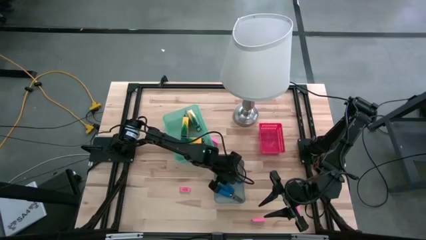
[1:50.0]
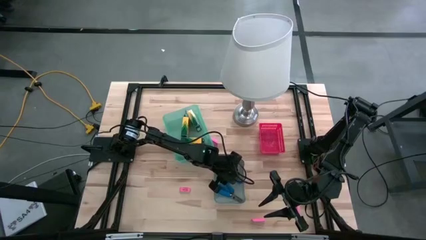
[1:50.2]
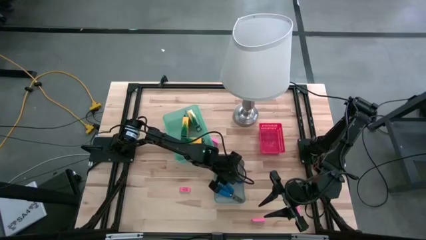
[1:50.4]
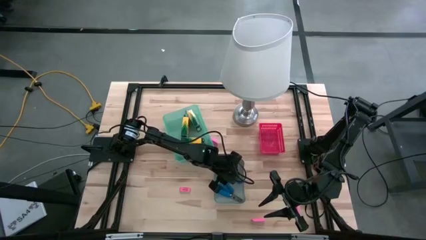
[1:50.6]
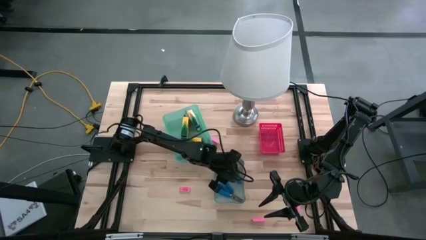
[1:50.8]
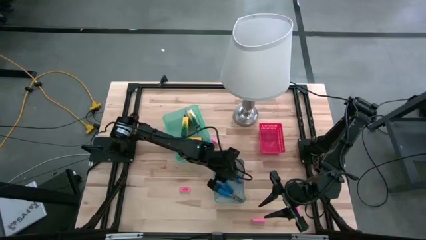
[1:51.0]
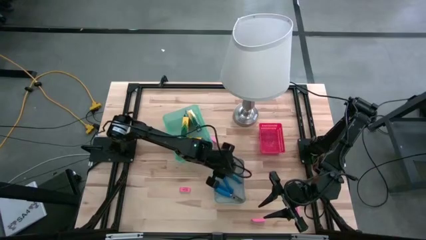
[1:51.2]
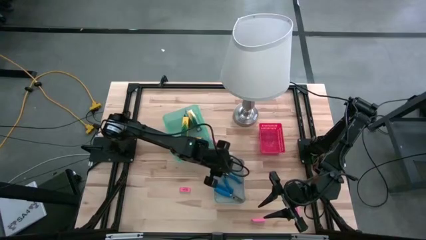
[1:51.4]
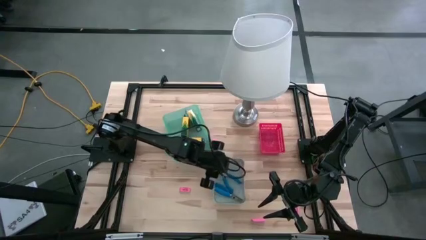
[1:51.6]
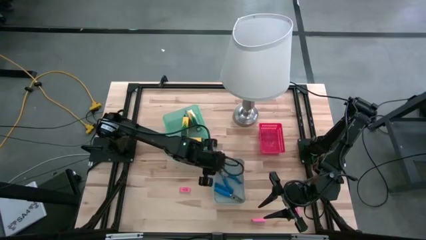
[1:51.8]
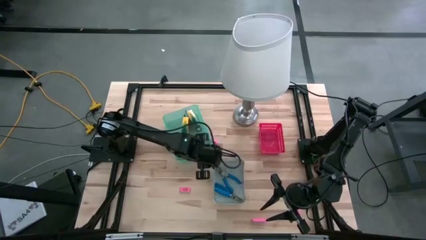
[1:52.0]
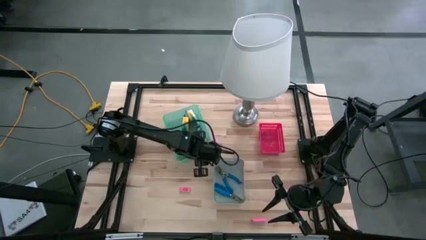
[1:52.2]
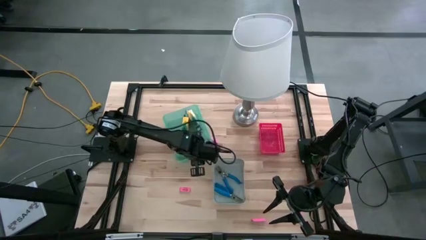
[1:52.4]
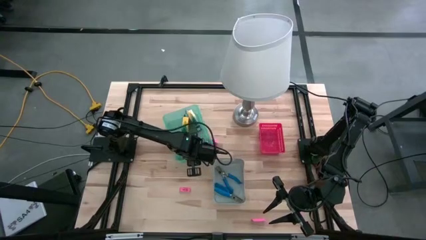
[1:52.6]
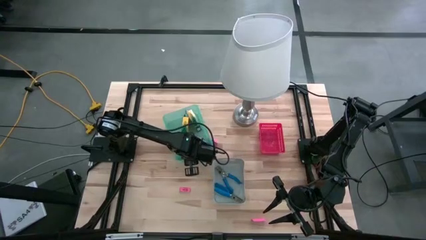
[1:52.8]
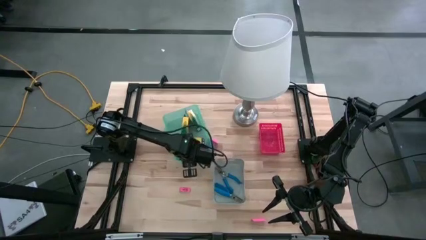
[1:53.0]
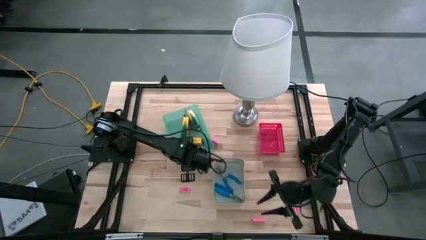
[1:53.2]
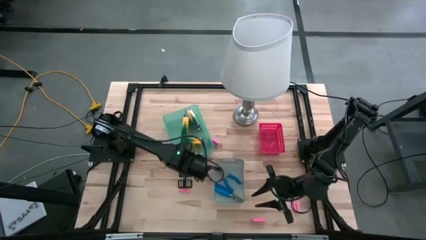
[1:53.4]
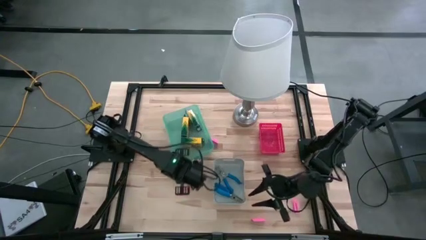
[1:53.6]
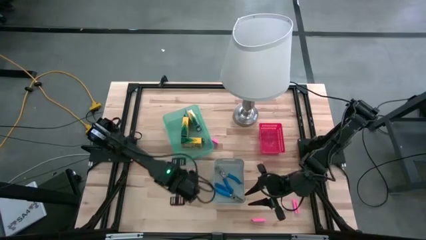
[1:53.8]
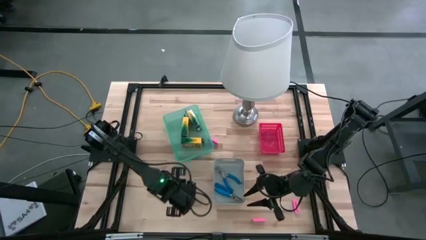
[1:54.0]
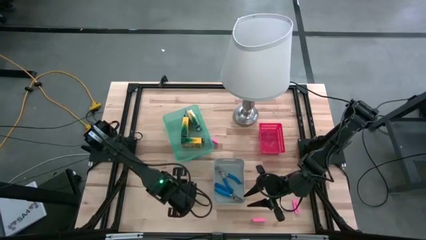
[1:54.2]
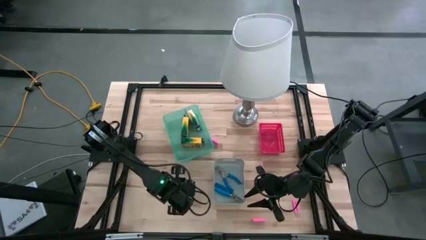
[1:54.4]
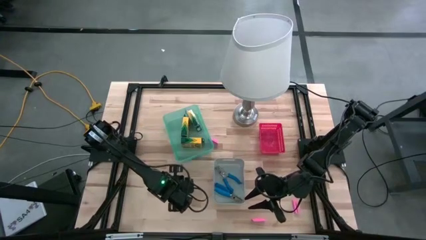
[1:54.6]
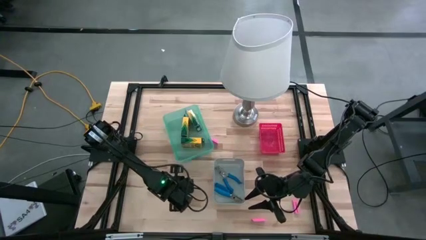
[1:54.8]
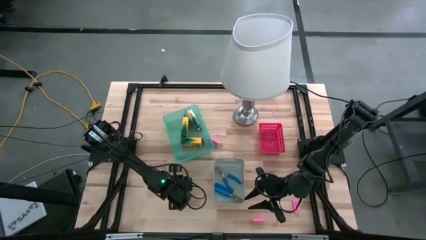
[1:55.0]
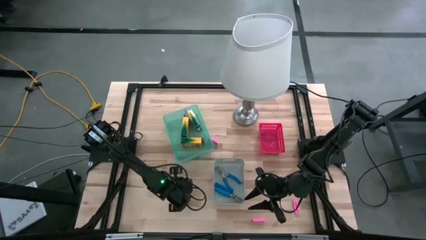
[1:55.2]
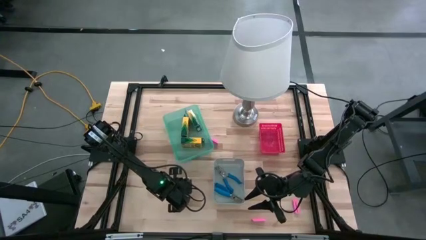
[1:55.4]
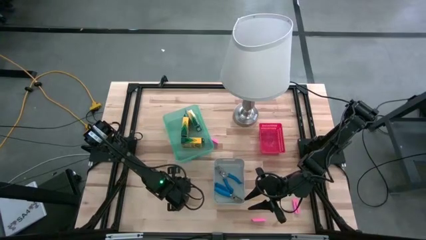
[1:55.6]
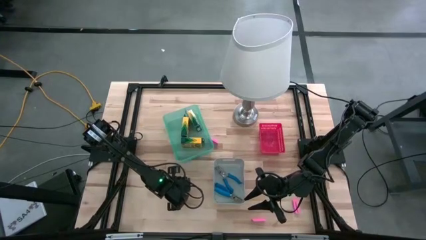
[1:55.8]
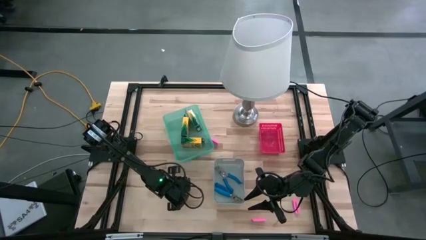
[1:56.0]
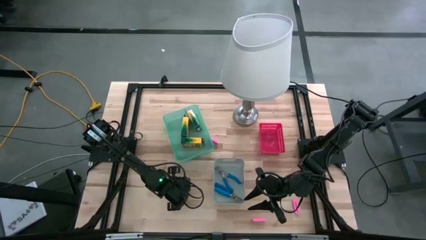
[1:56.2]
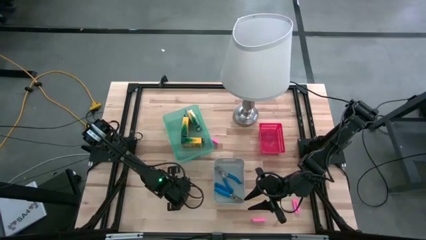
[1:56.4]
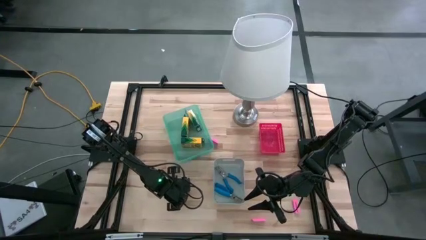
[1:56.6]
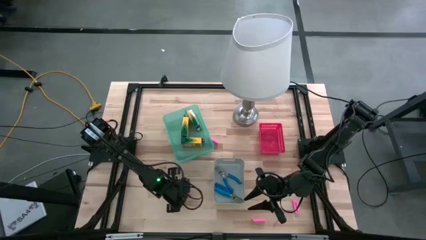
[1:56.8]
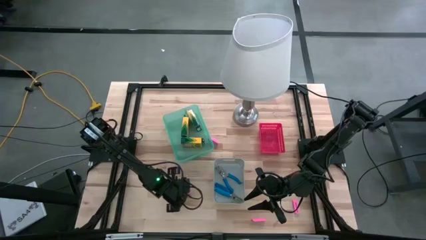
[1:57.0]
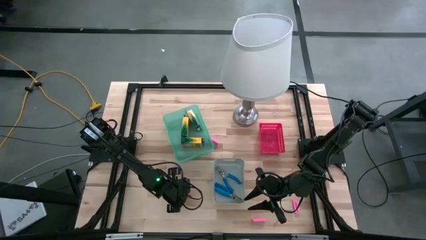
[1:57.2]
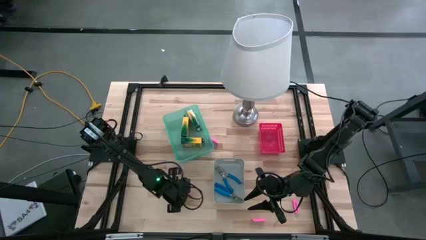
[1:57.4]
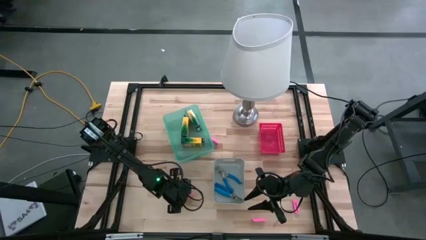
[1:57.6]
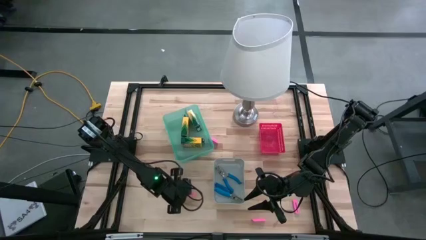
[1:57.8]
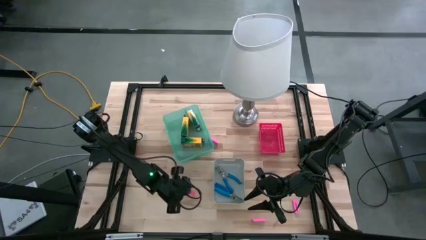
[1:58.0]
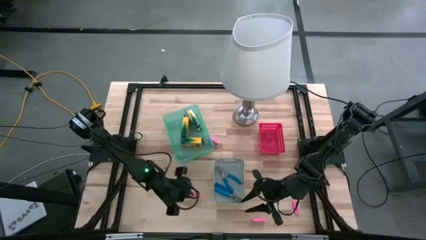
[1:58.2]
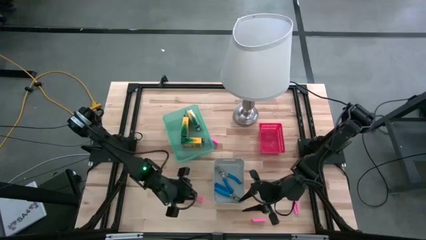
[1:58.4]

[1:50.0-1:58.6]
Task: Pick & Place School Supplies
Put the pink eraser into the red bin

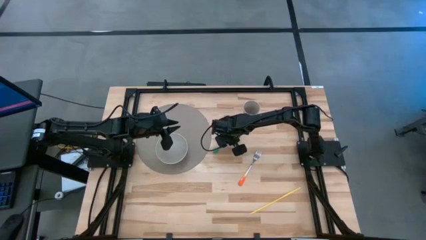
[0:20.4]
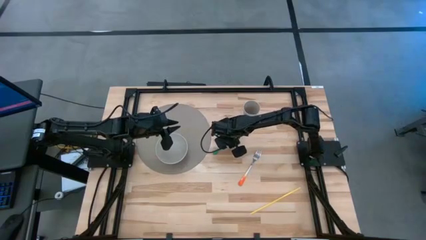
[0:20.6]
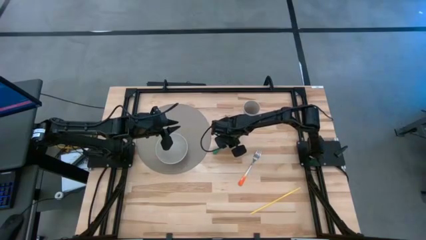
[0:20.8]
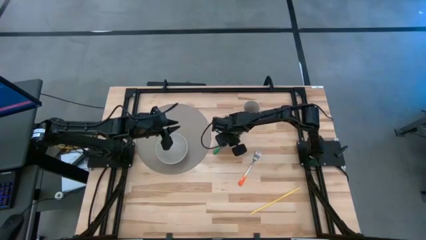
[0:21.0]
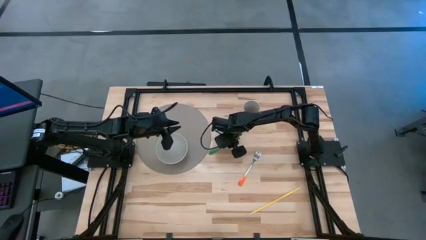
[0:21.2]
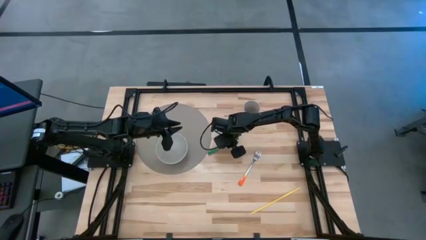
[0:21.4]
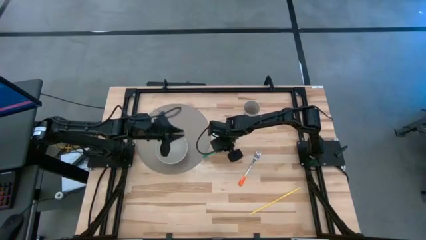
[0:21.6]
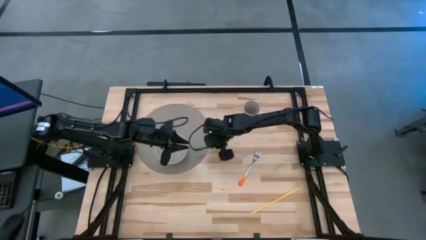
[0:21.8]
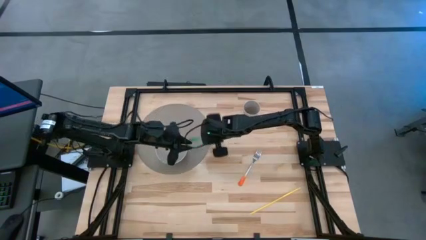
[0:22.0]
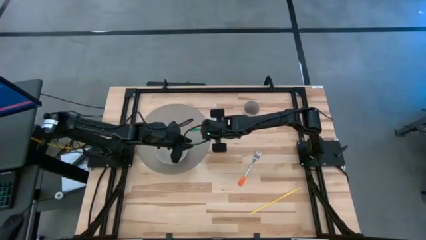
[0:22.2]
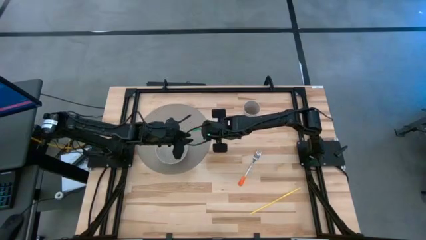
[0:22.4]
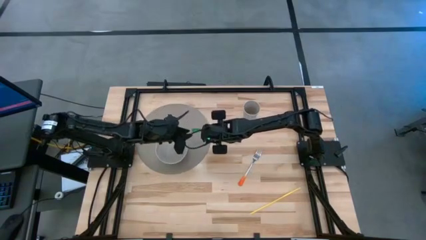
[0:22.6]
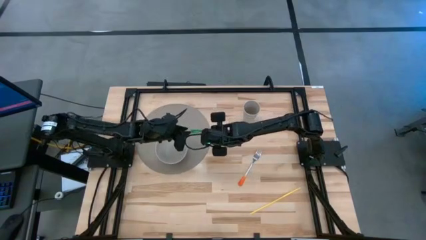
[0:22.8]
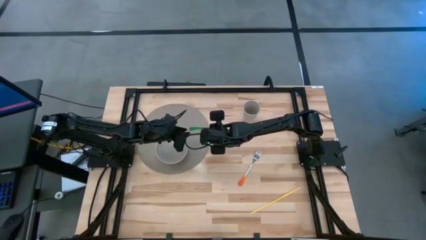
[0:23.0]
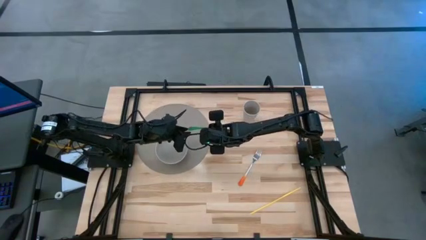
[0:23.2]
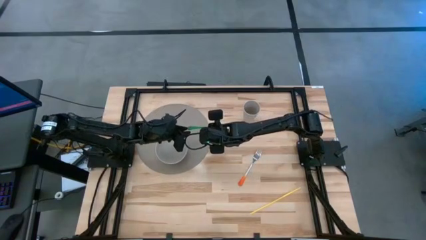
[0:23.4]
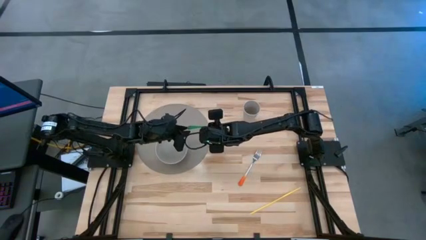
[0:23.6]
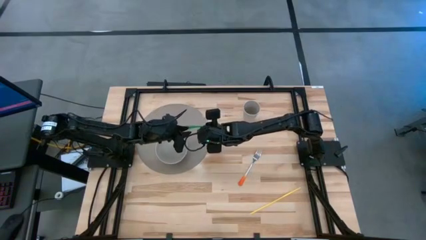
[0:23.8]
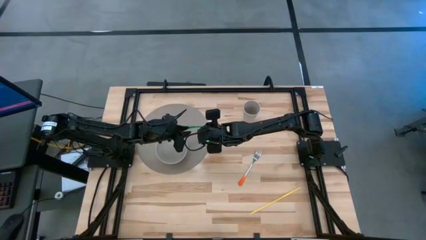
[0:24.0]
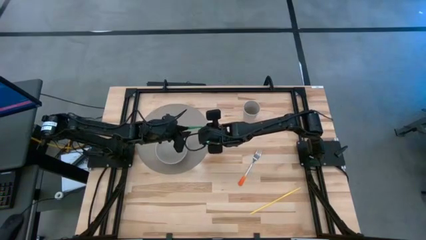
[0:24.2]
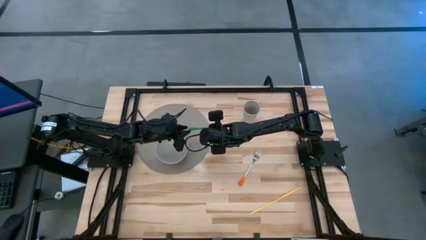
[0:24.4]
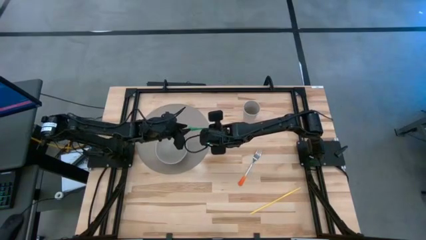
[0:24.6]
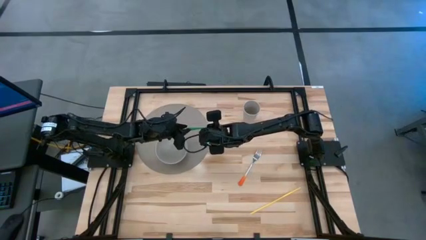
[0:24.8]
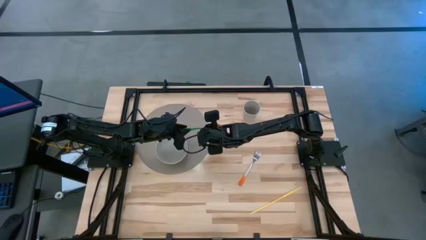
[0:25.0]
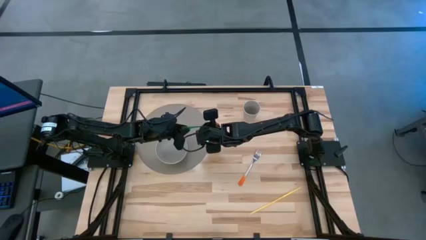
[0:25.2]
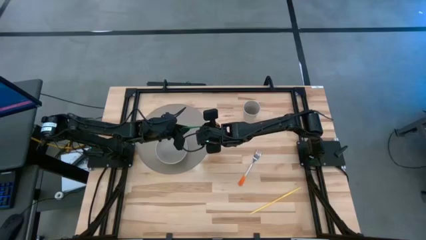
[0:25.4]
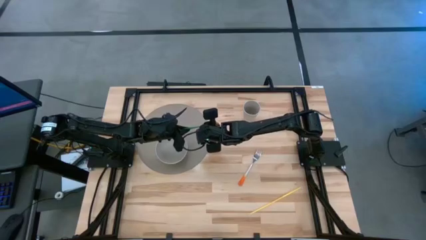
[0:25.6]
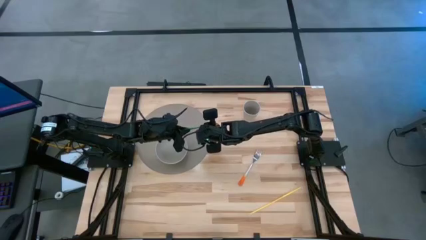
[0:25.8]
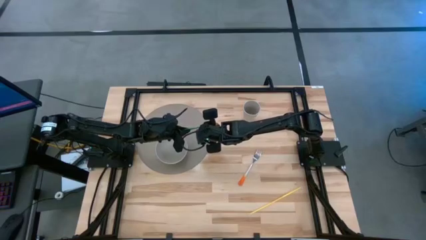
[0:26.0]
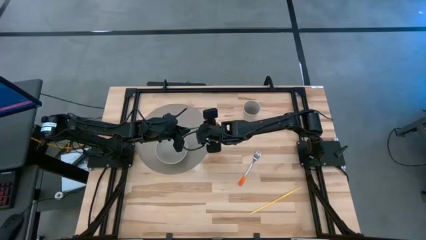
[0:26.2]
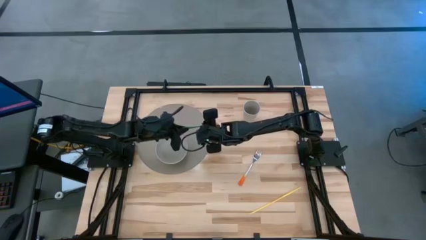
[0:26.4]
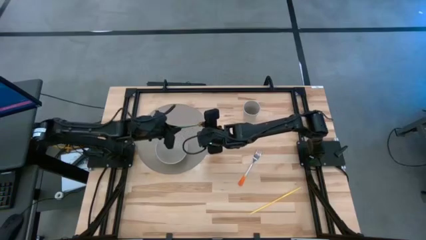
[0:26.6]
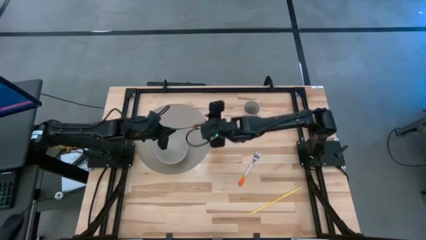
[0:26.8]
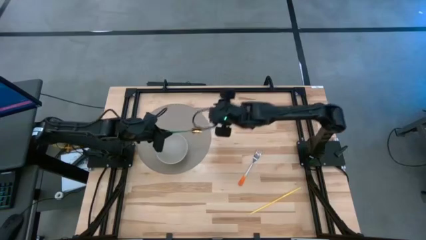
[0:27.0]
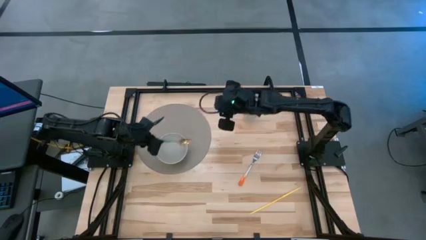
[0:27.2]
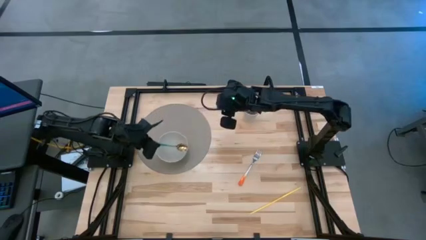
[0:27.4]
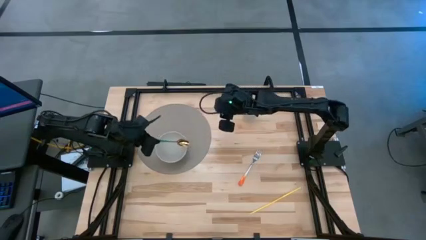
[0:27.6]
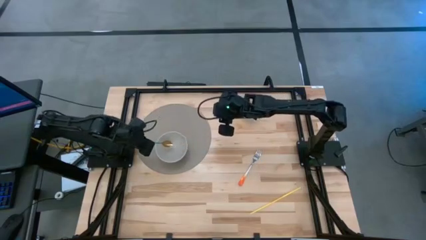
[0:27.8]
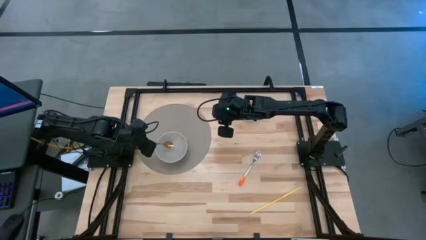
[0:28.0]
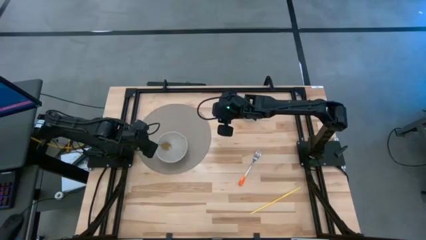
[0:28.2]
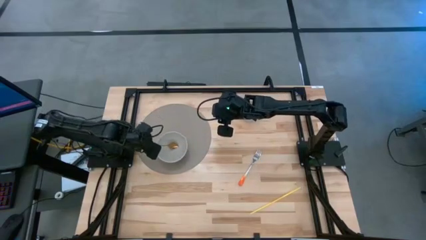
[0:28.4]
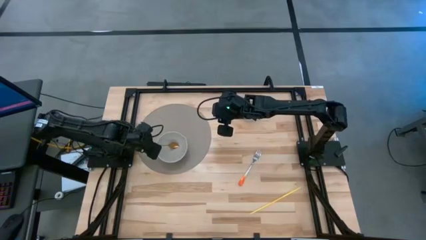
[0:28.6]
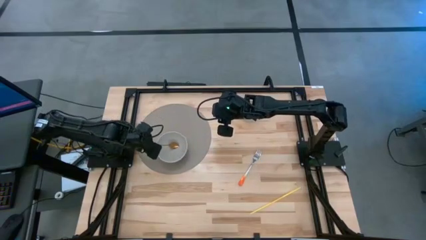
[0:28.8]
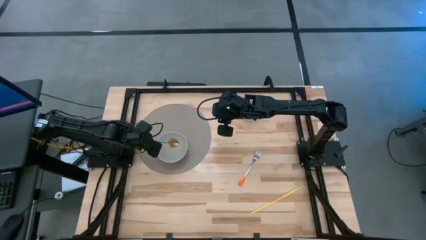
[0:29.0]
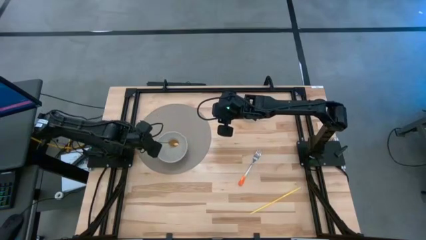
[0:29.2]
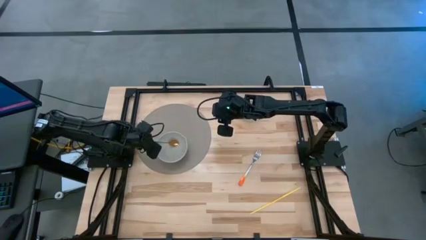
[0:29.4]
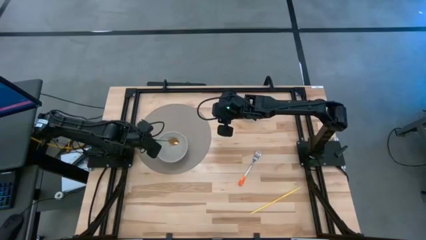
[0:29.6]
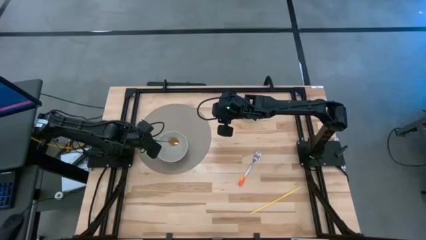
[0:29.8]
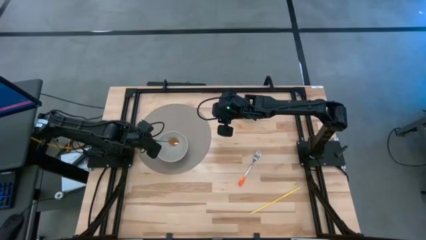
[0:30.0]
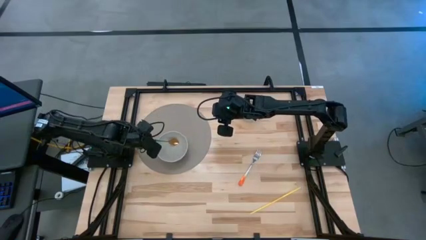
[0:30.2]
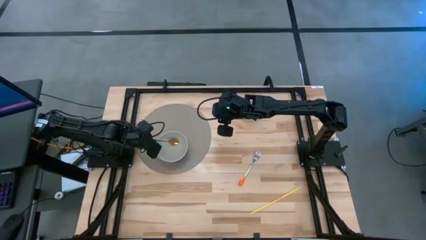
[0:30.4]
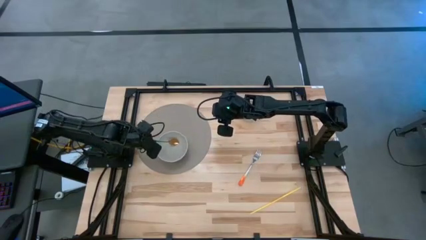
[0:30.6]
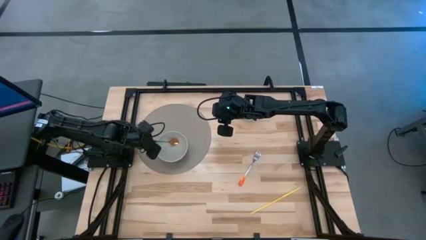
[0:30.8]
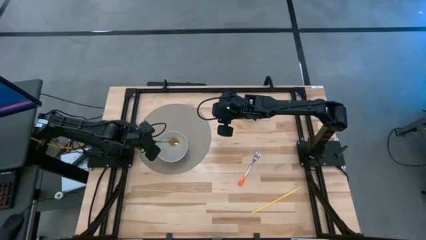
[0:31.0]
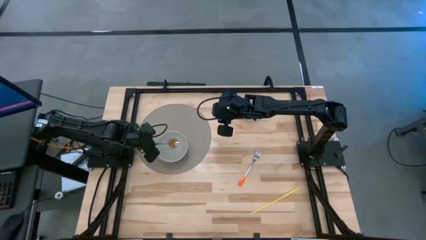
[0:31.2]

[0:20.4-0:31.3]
Task: Pick & Place Utensil
Put the green spoon into the white bowl
